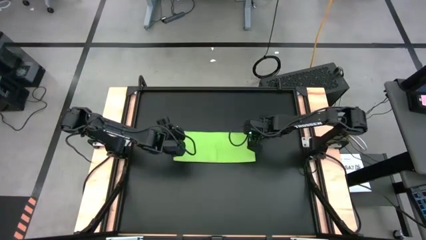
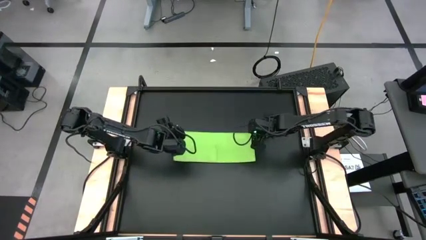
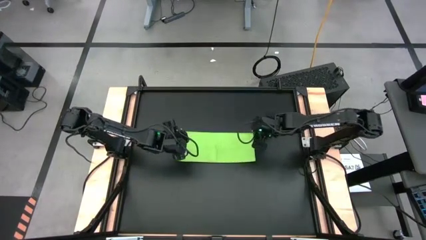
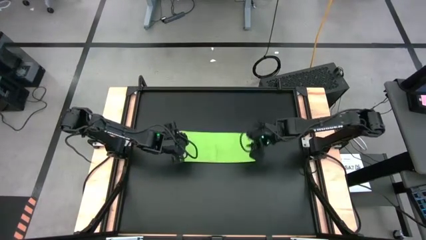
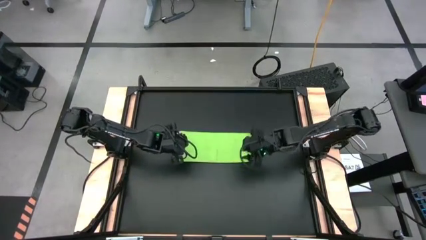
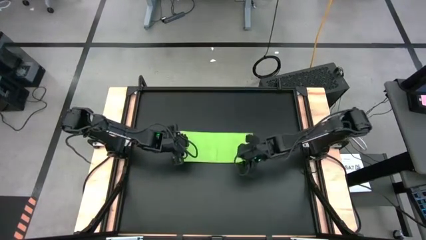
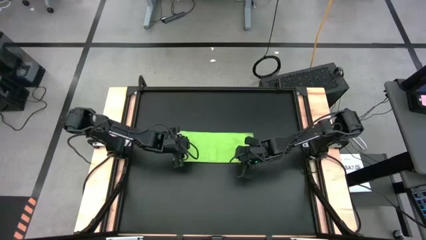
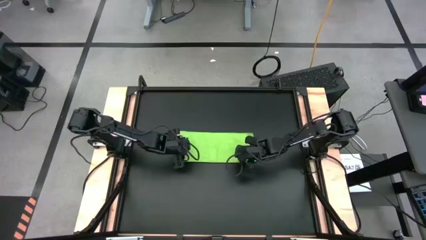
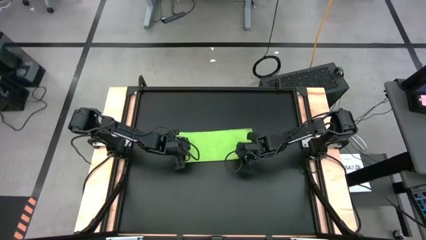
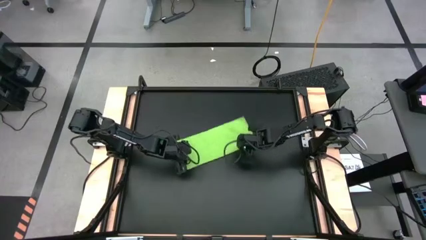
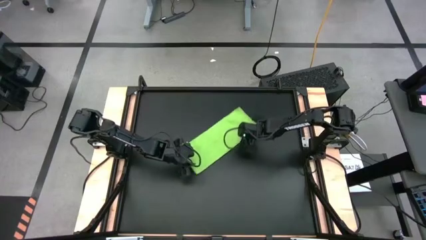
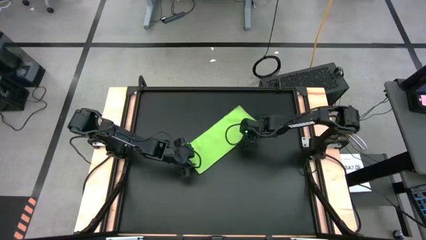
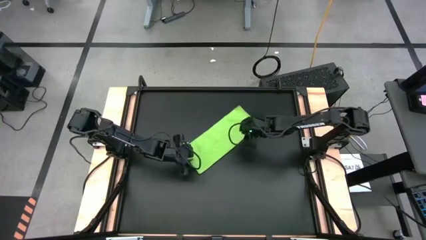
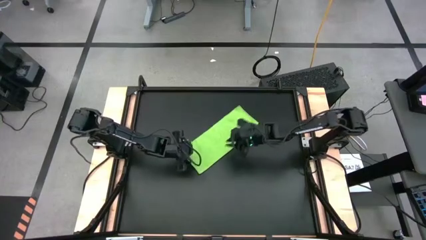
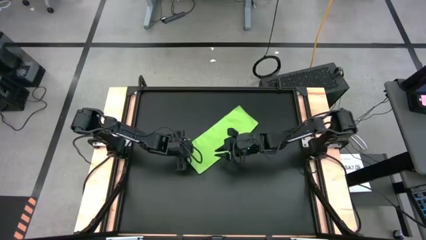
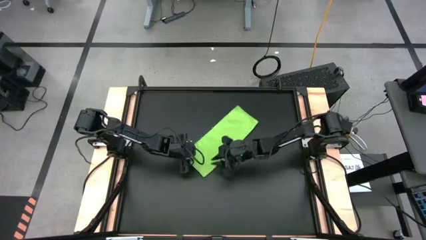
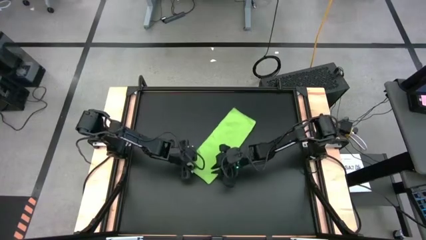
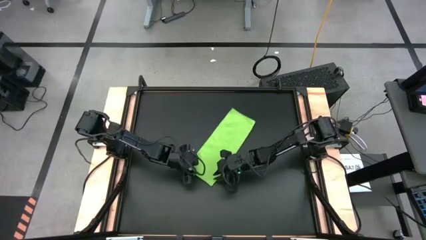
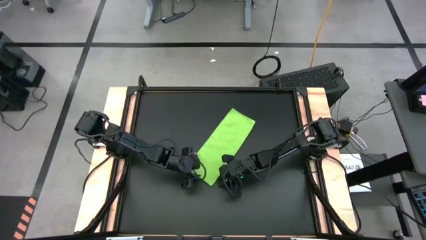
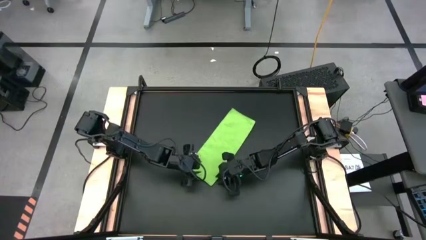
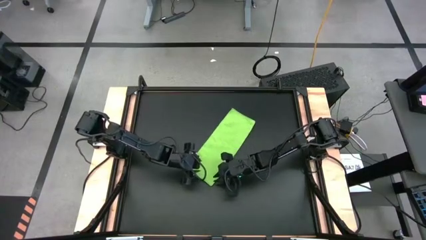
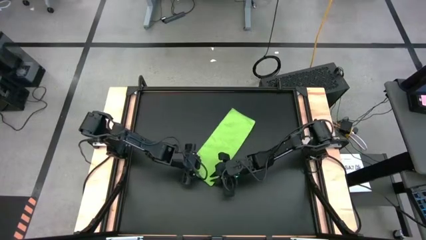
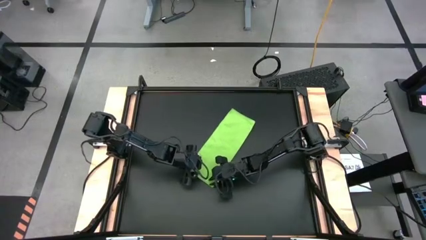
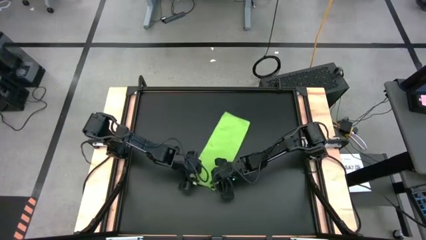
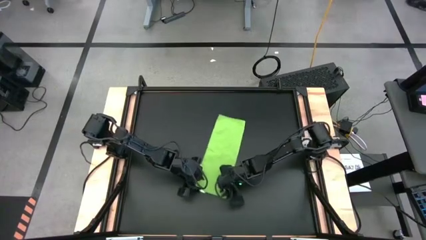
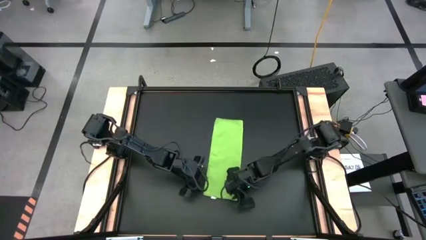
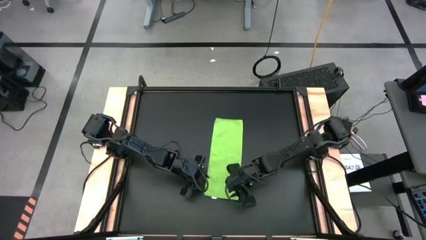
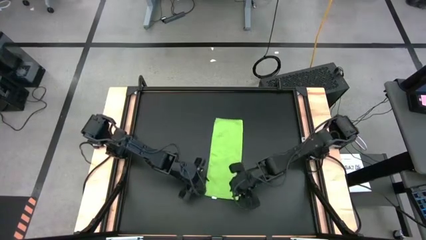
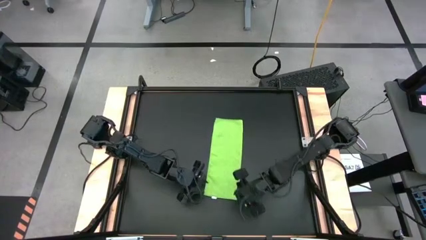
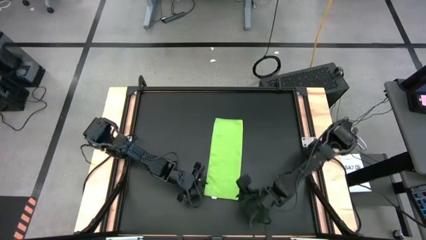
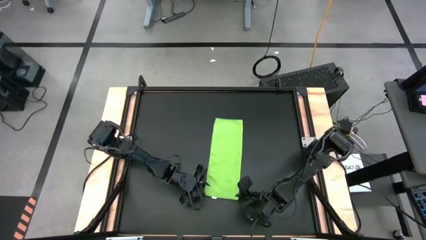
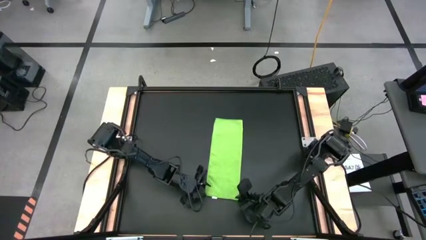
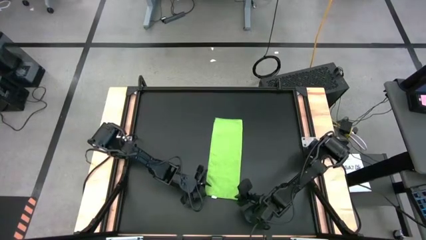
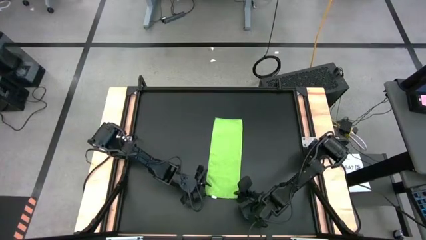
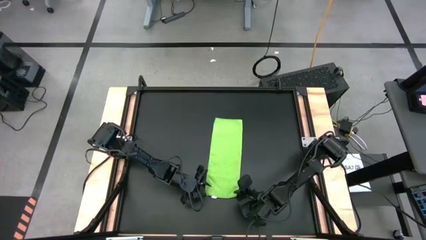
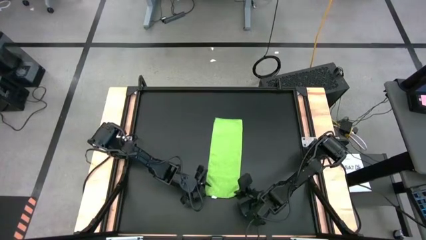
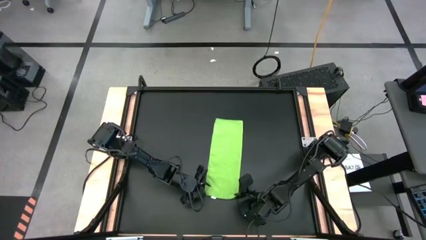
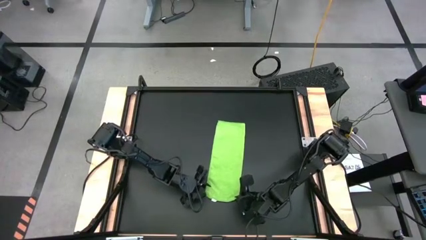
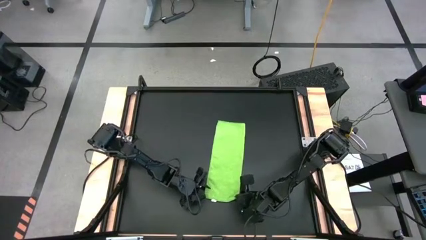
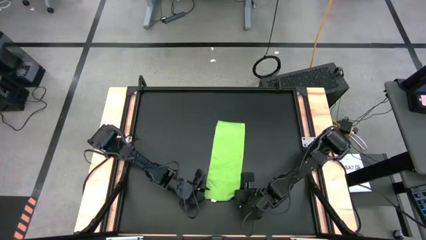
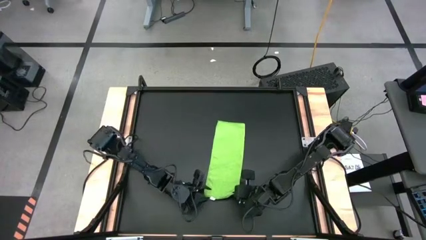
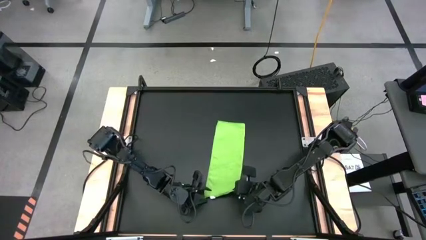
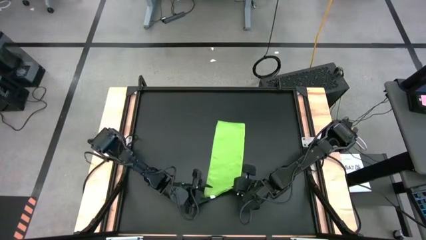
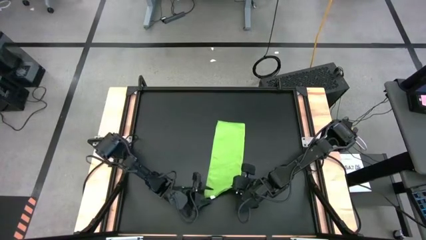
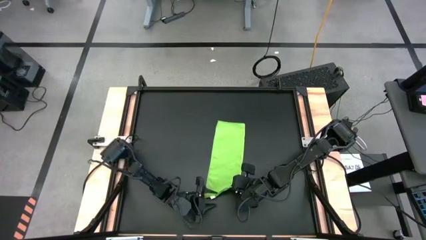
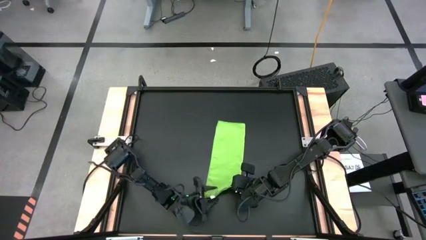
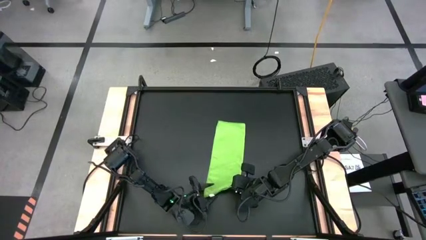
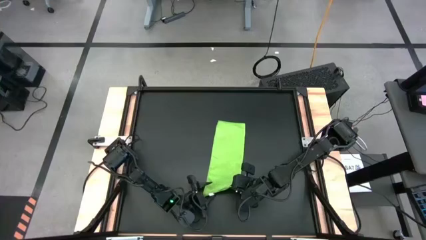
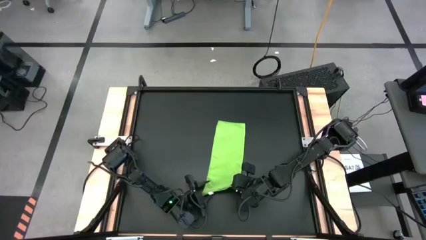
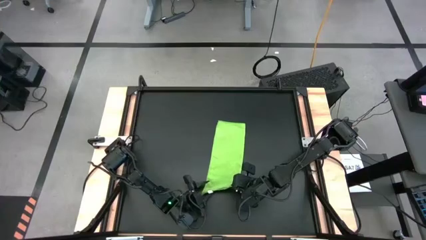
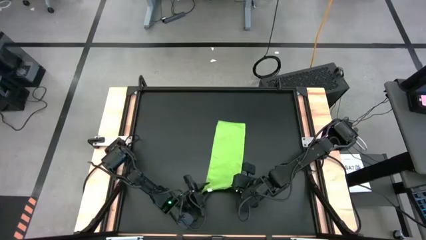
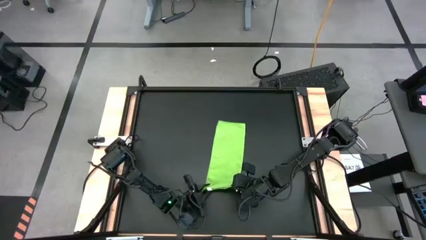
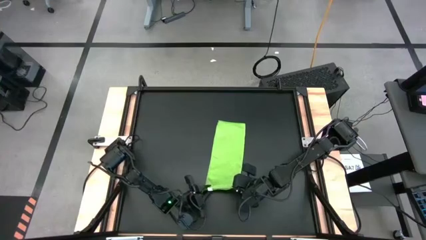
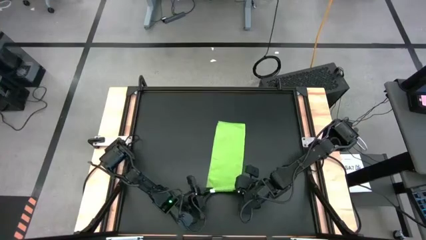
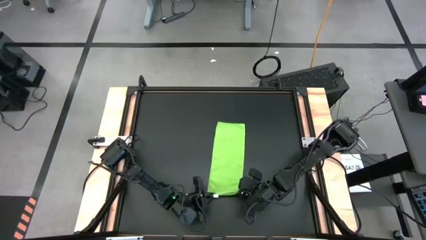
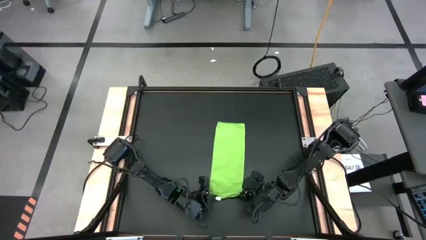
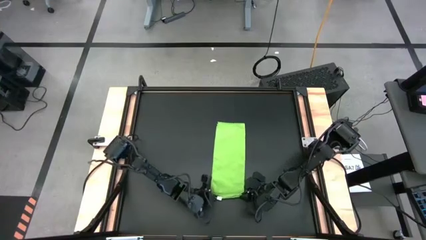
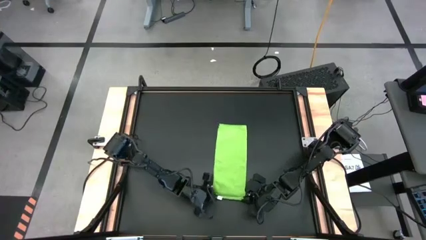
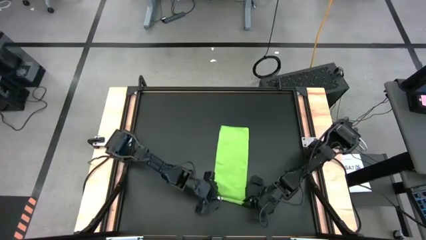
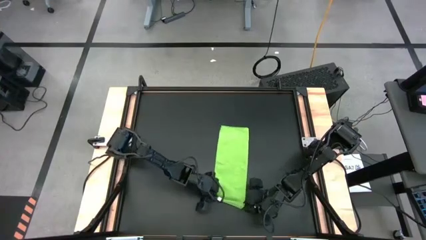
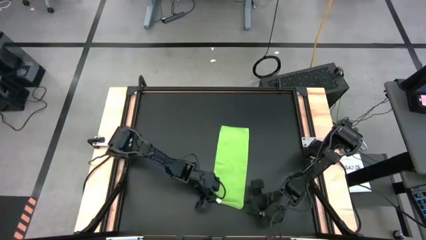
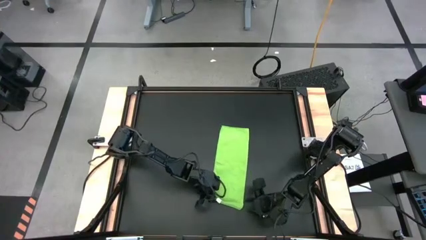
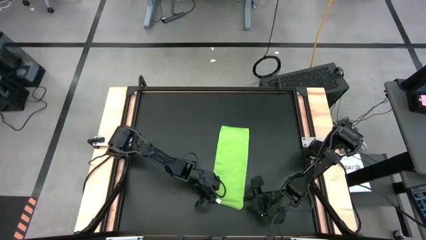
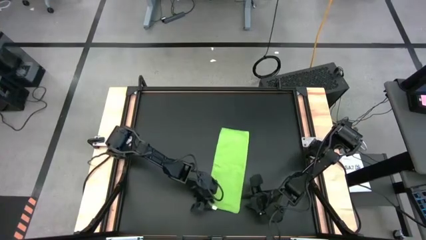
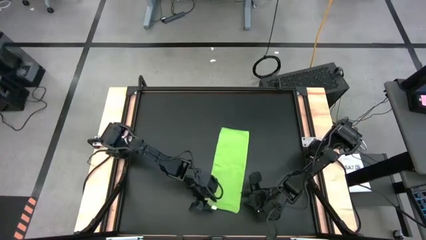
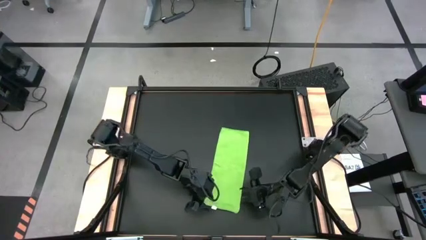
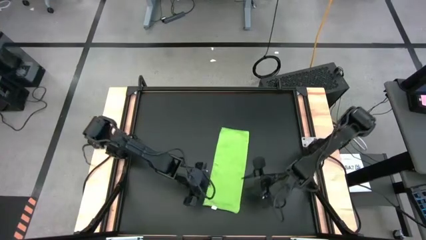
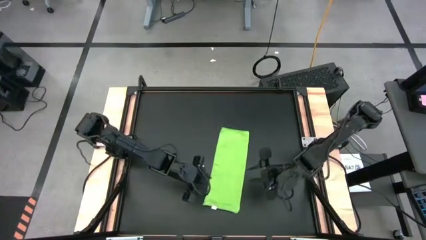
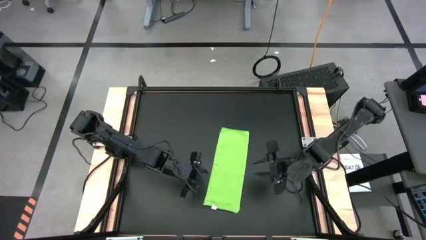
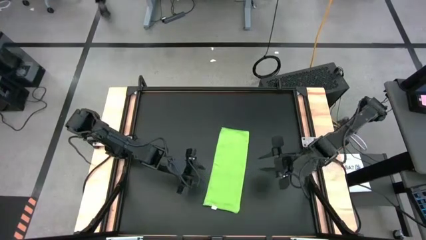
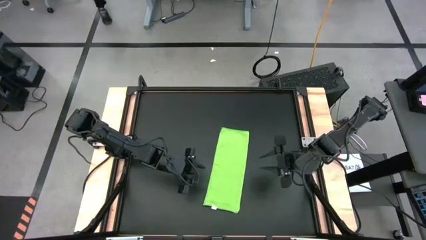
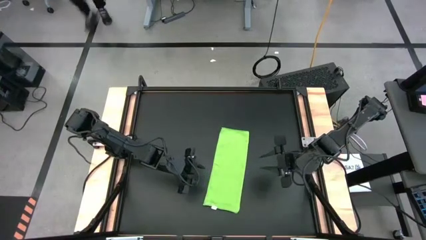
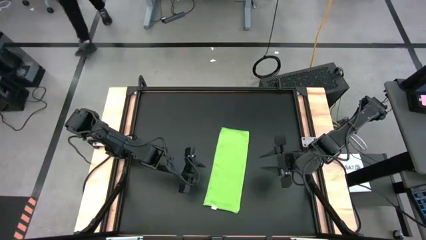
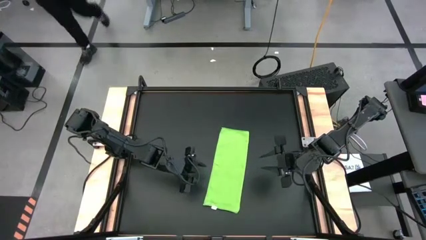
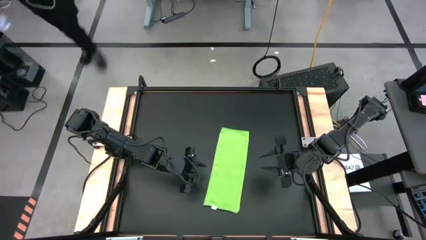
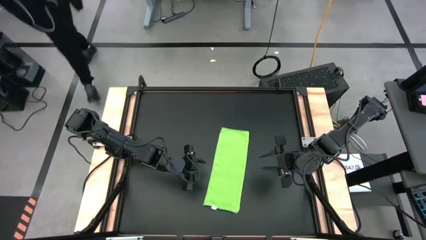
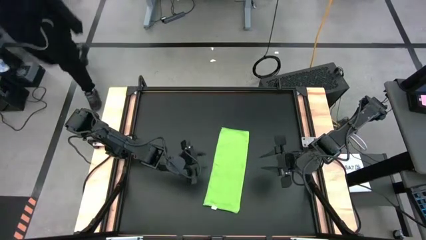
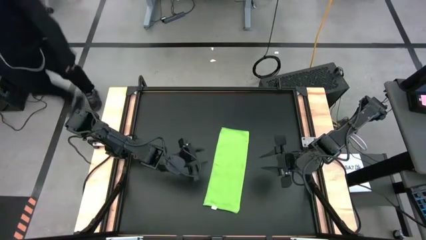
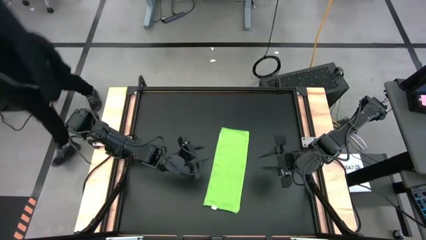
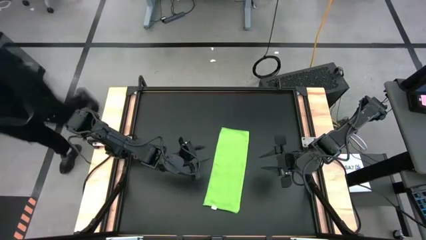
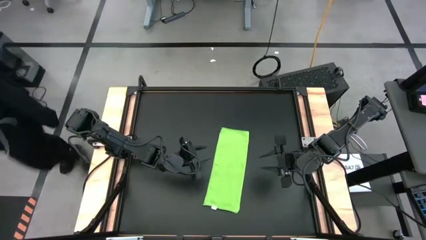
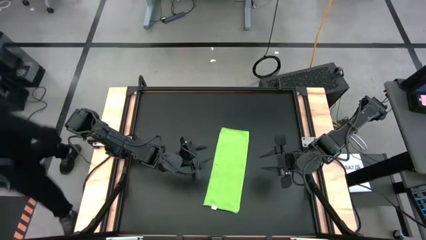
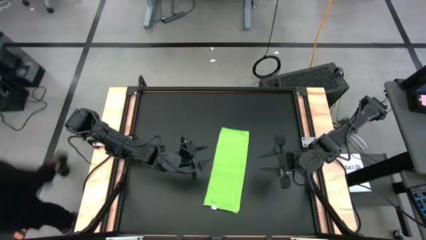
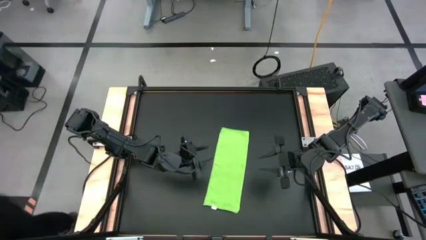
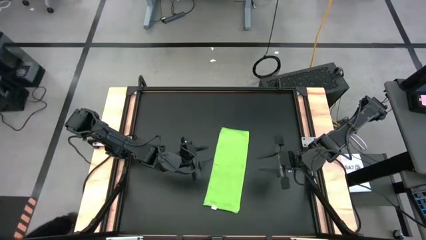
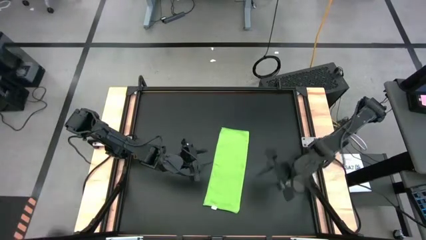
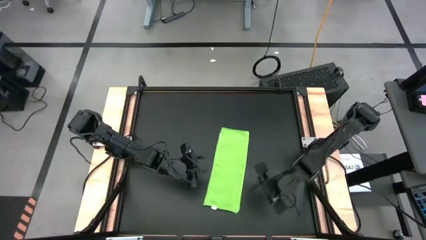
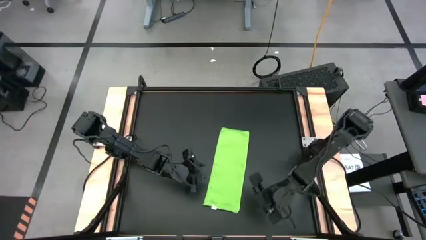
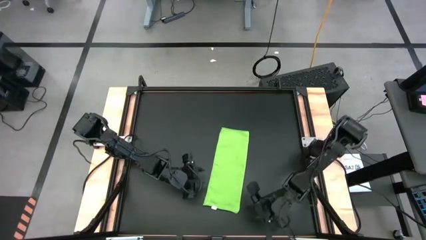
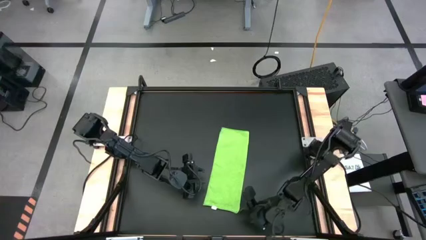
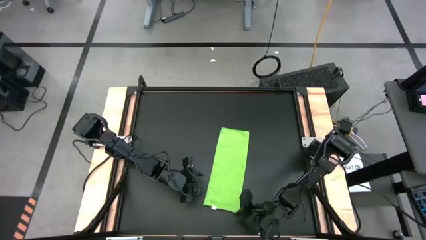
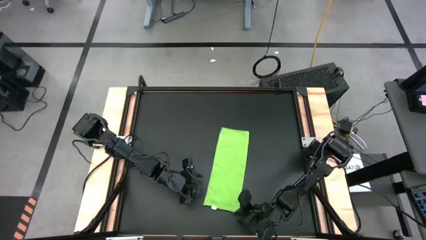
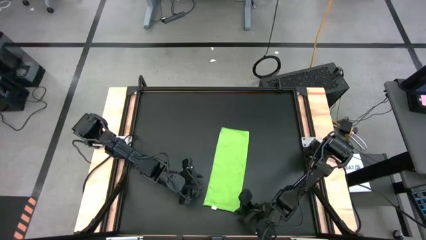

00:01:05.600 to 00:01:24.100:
Task: Roll towel into tight, uniform cylinder
Roll the green towel
